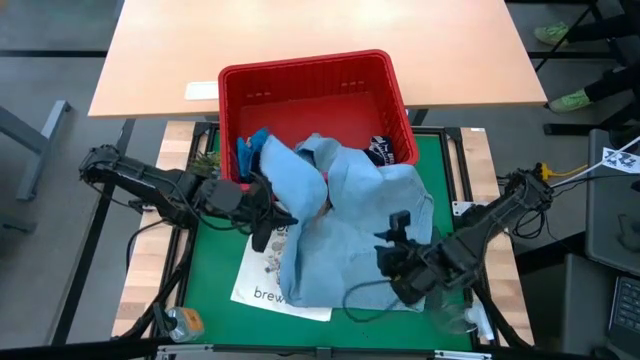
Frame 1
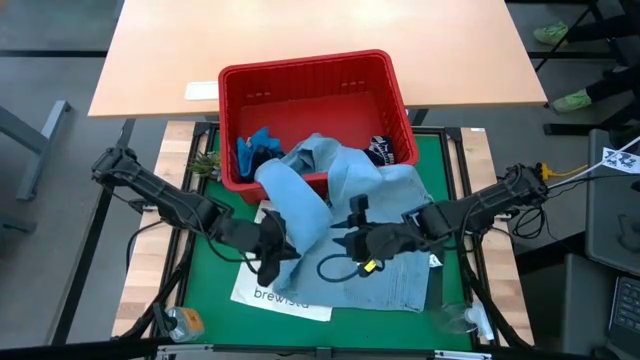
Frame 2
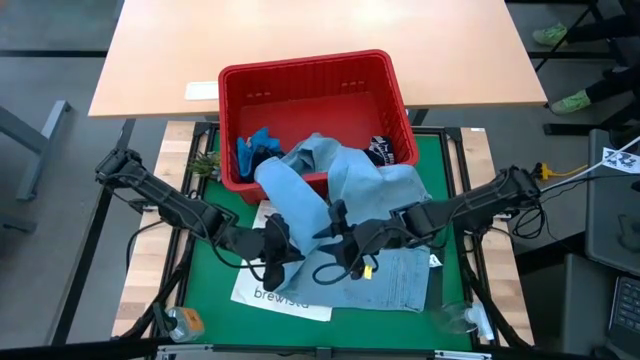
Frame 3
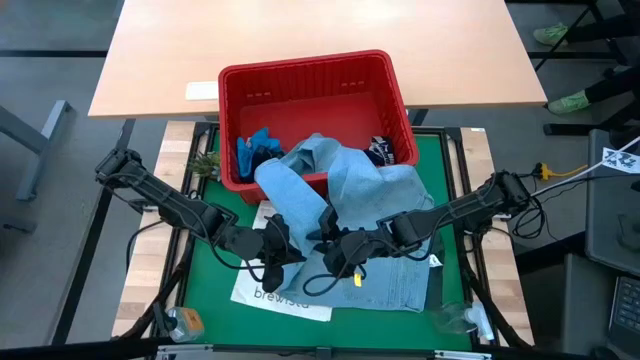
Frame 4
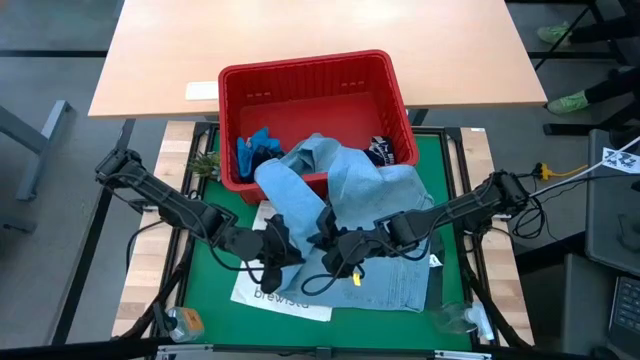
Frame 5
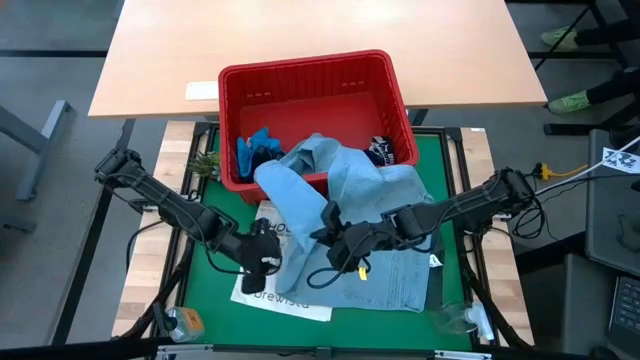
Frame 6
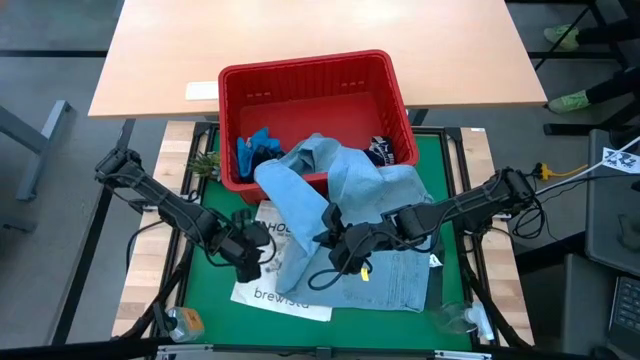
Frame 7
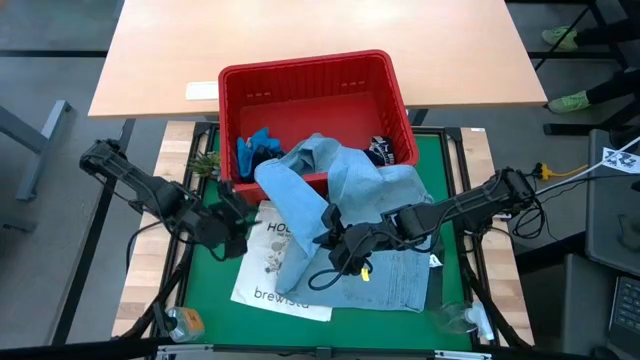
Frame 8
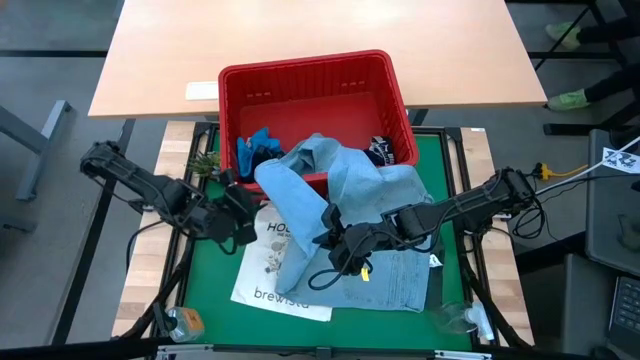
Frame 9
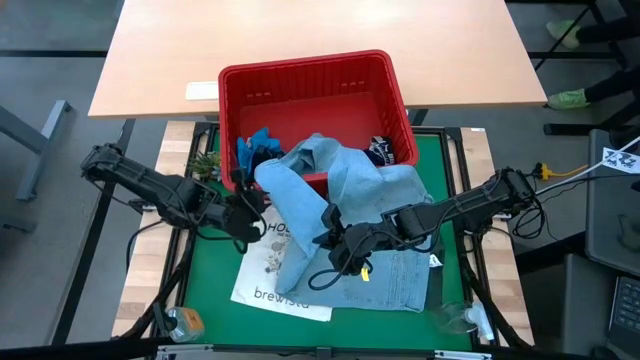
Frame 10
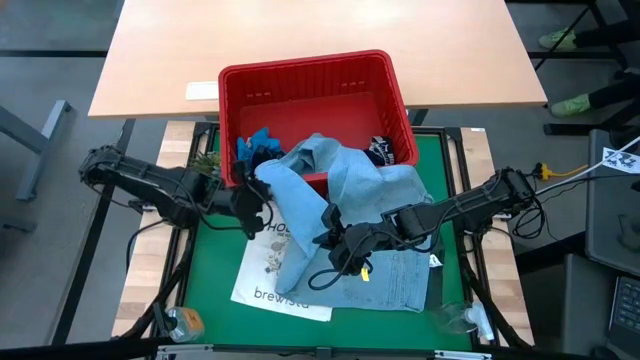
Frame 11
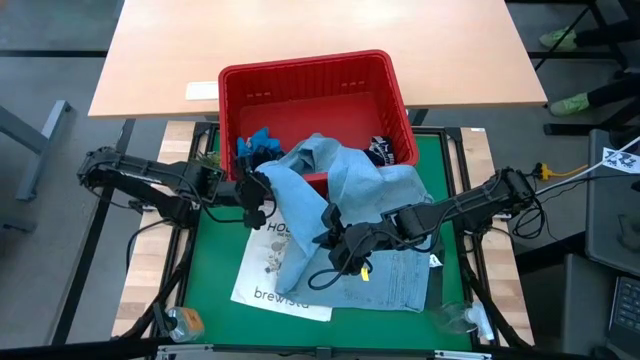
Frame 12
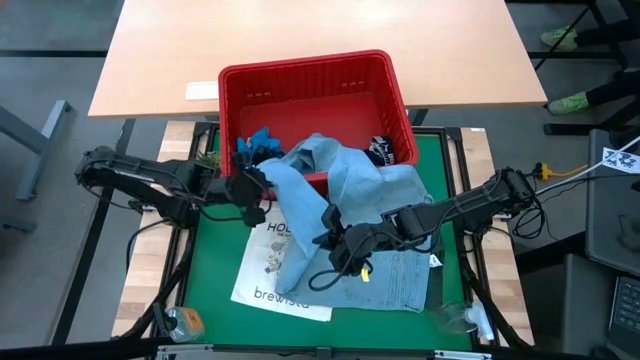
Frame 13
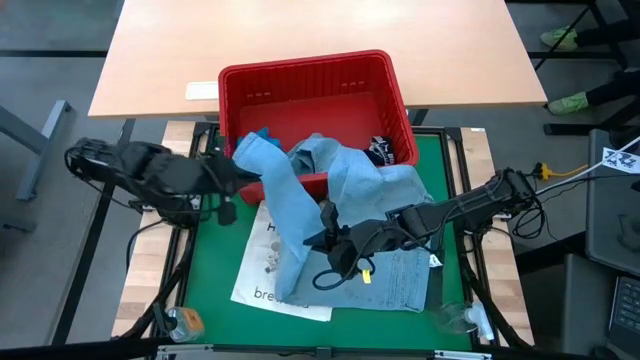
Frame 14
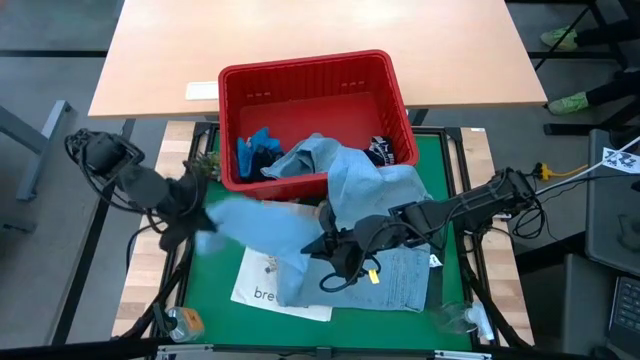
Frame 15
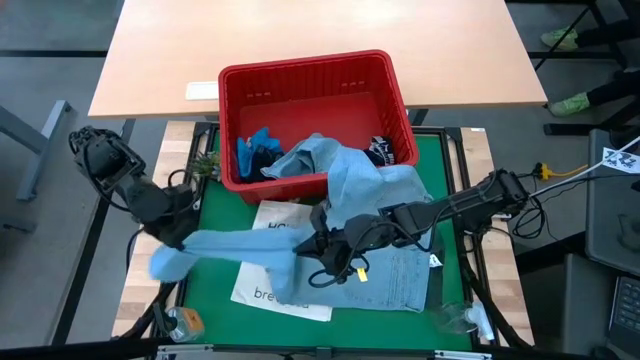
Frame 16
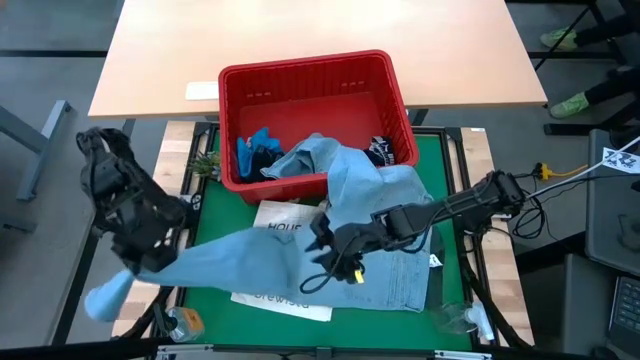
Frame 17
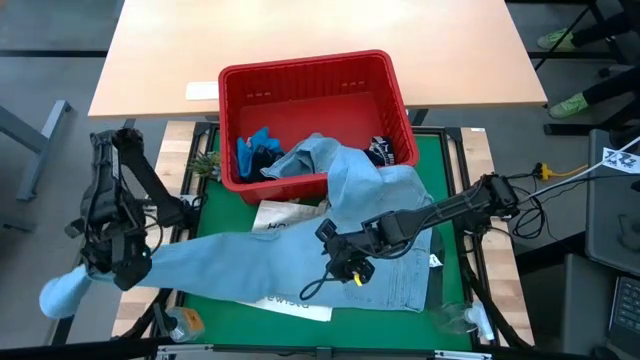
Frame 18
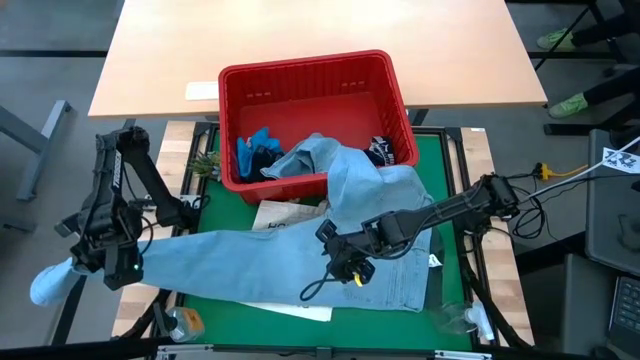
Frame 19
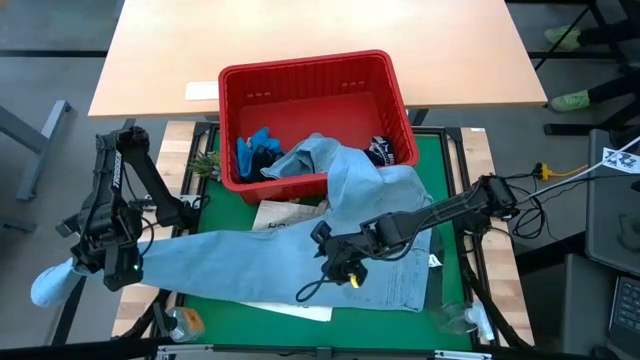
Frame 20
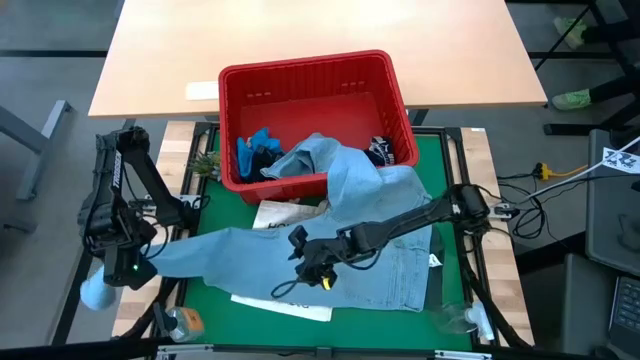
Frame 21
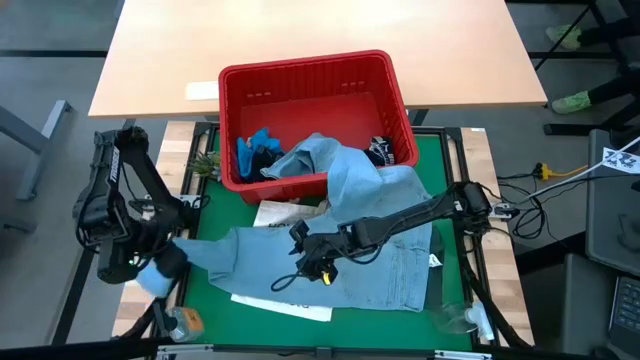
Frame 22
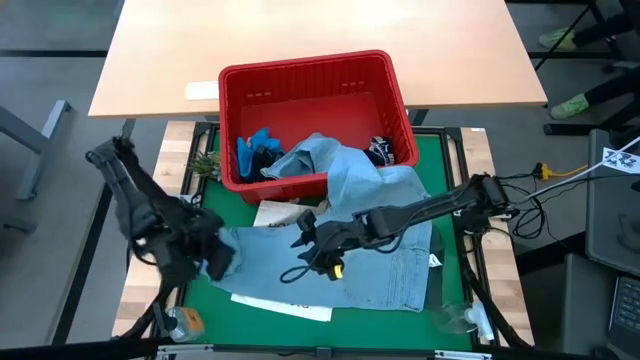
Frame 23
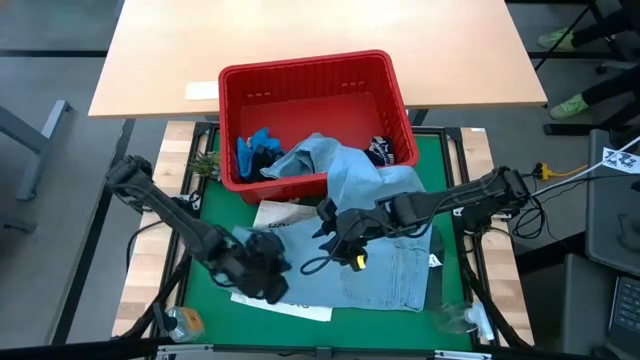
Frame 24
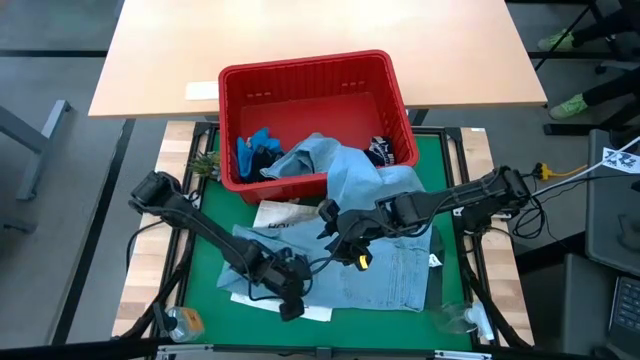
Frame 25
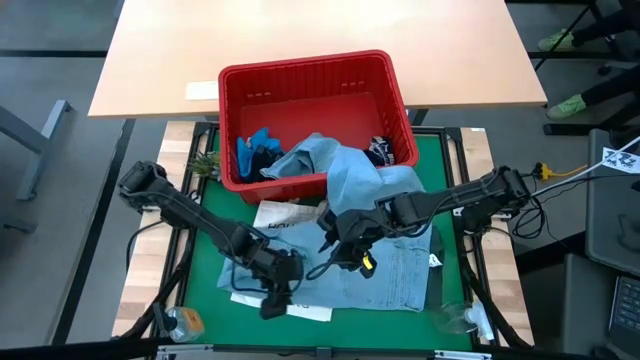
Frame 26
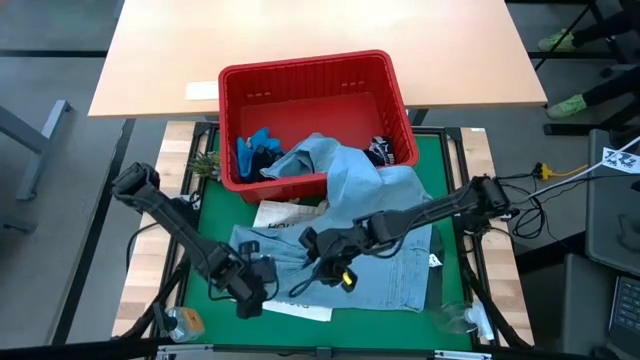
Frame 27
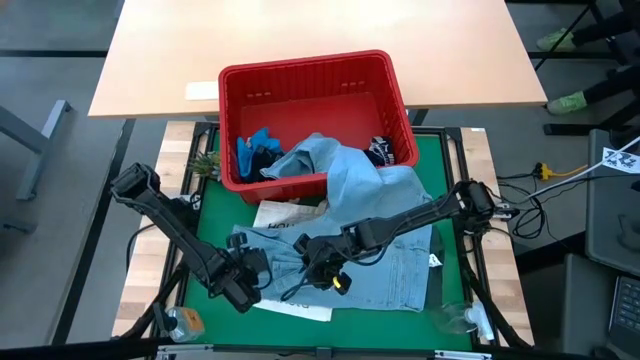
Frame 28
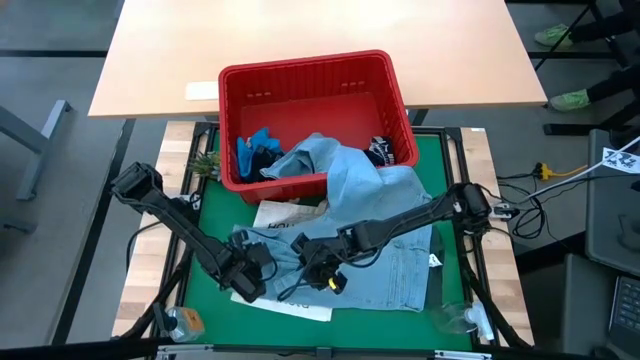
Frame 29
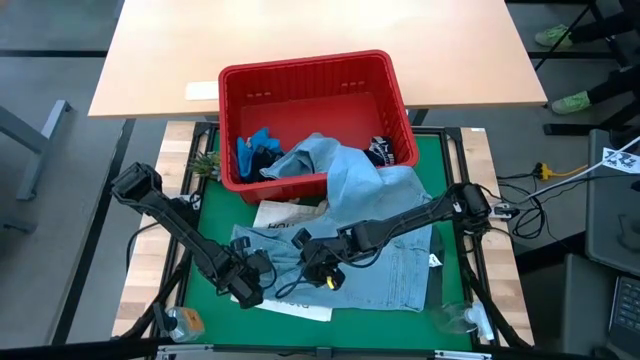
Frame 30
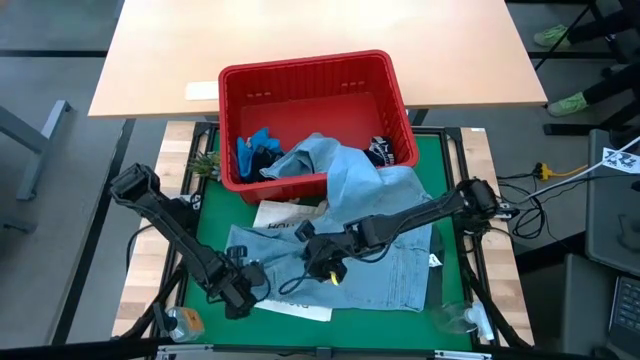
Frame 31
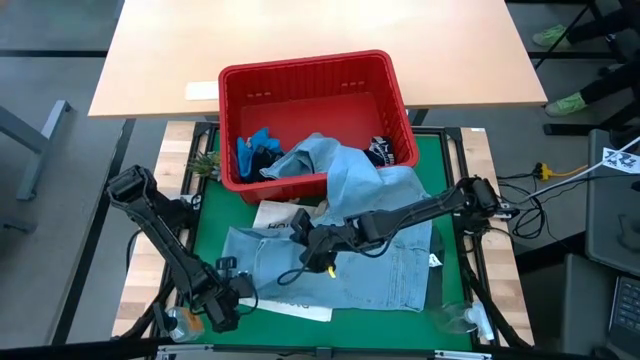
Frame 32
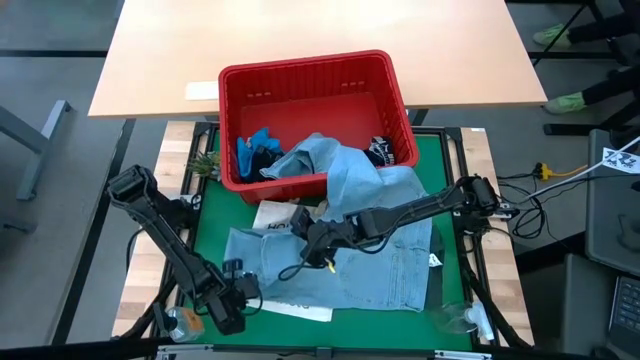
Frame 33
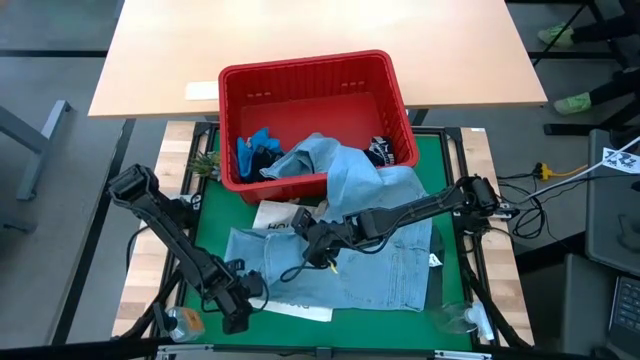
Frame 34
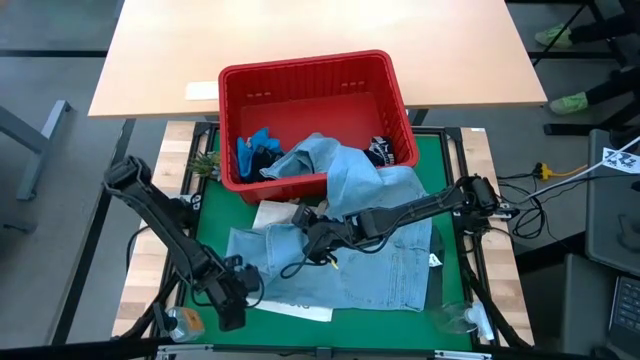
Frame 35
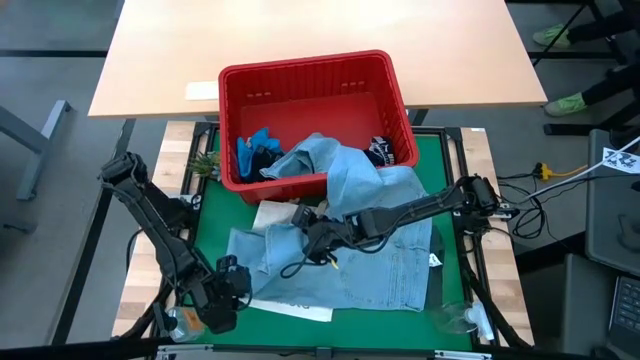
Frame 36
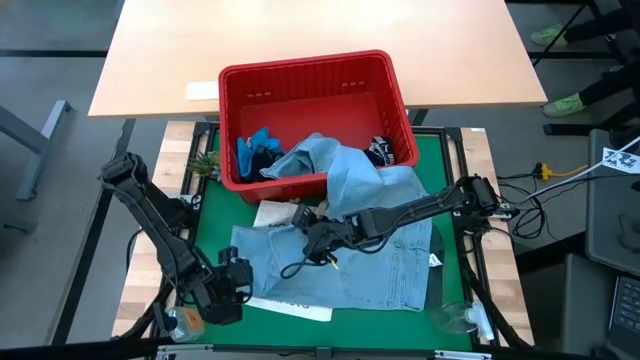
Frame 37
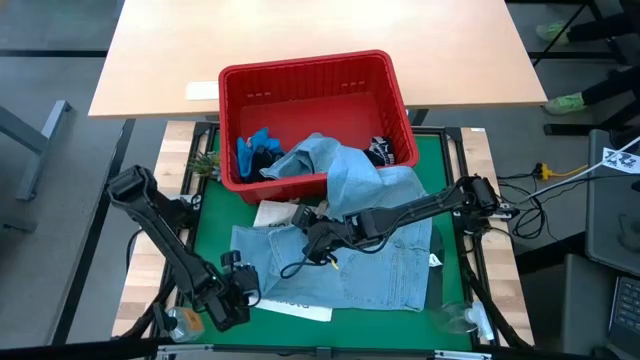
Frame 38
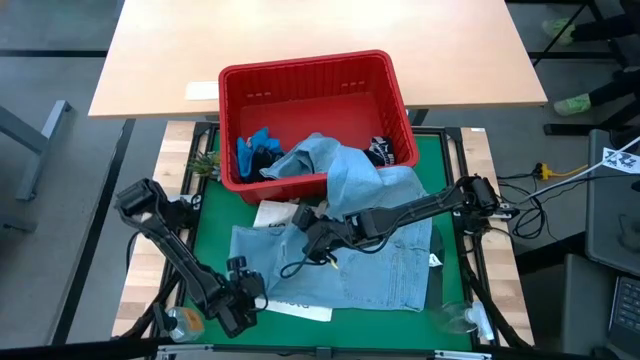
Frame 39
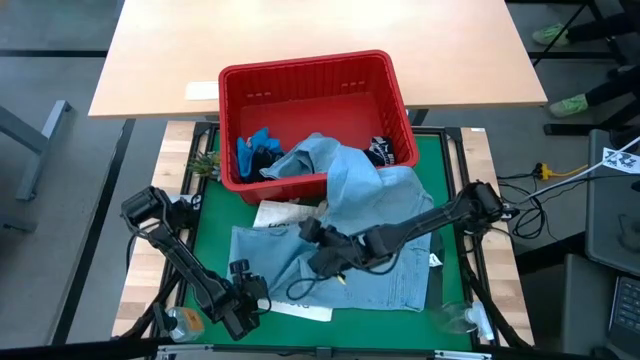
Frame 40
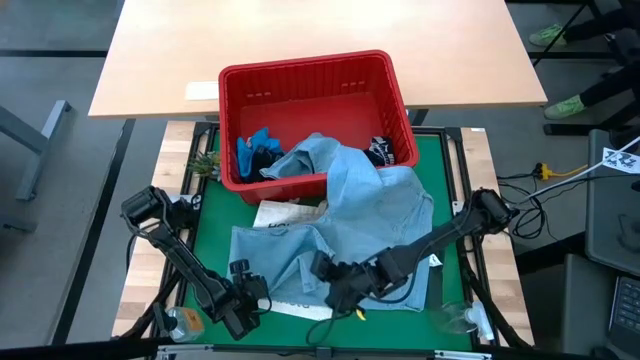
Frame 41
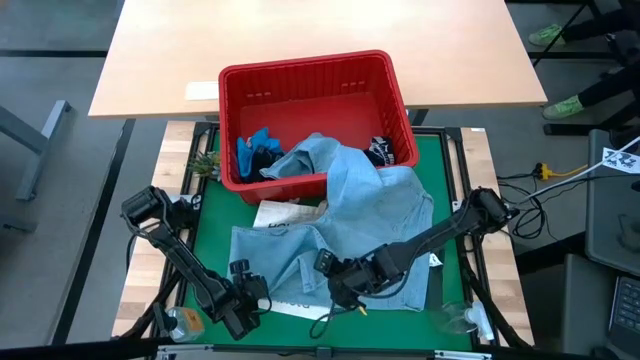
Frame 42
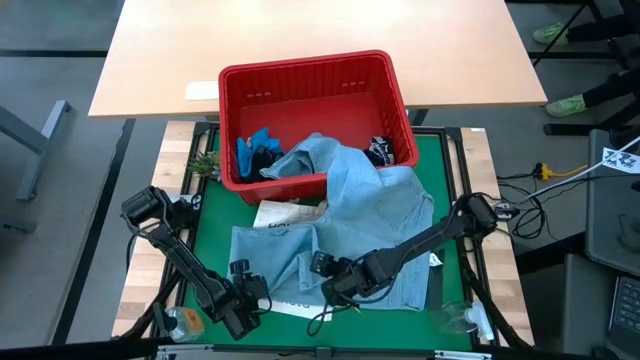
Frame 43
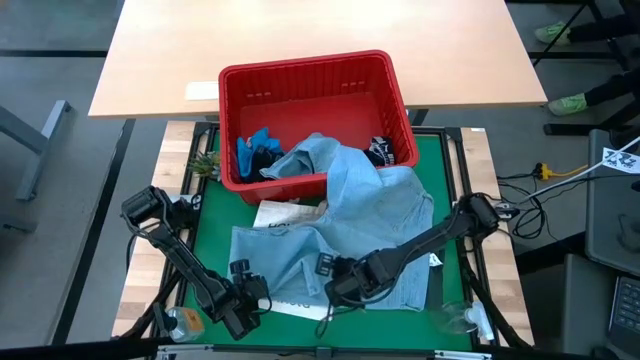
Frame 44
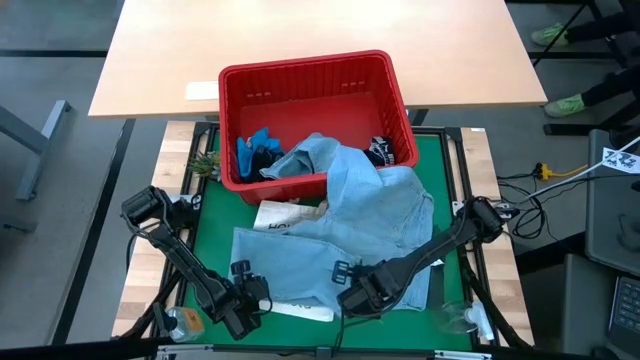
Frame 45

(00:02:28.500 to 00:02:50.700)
Task: Fold Laundry from Bin
Fold the light blue jeans
